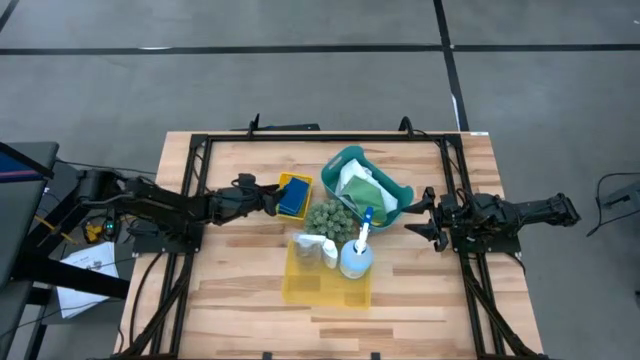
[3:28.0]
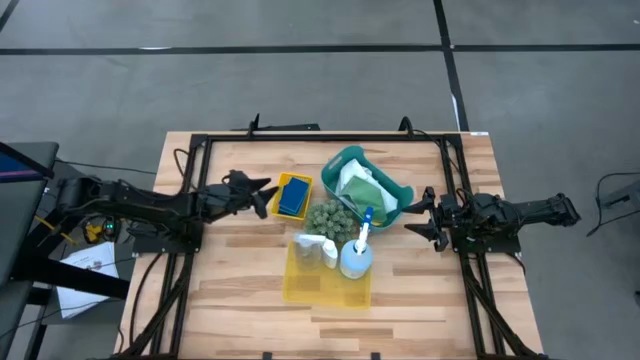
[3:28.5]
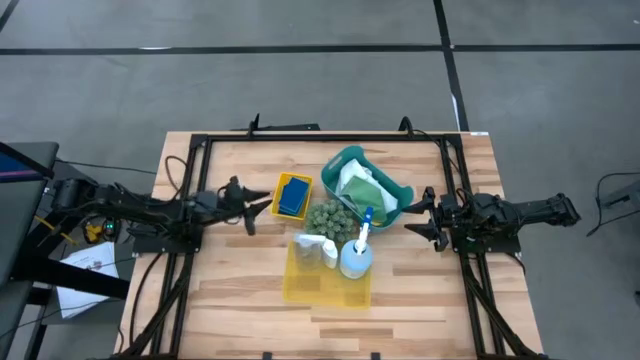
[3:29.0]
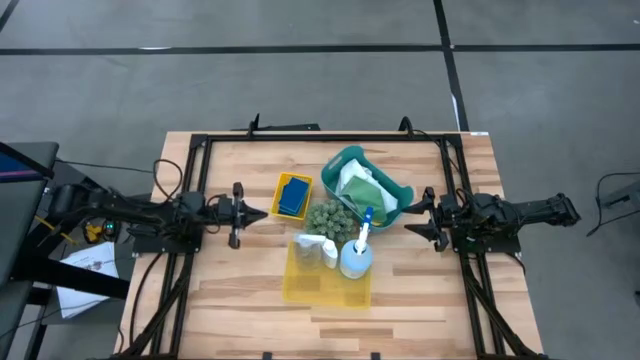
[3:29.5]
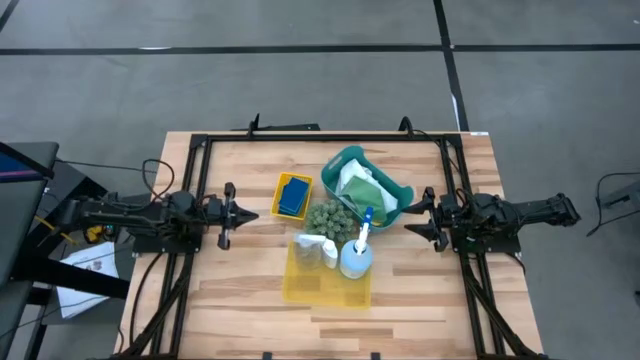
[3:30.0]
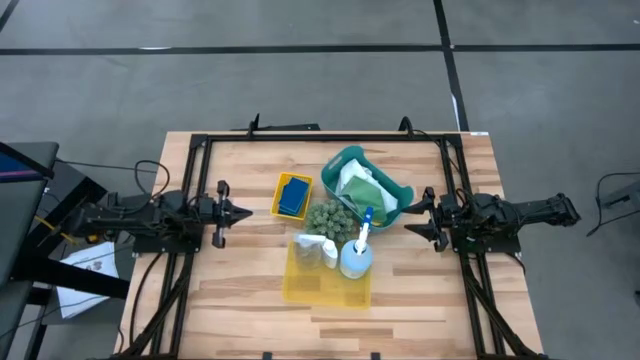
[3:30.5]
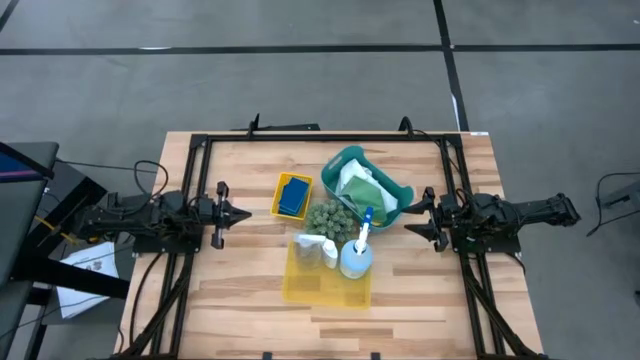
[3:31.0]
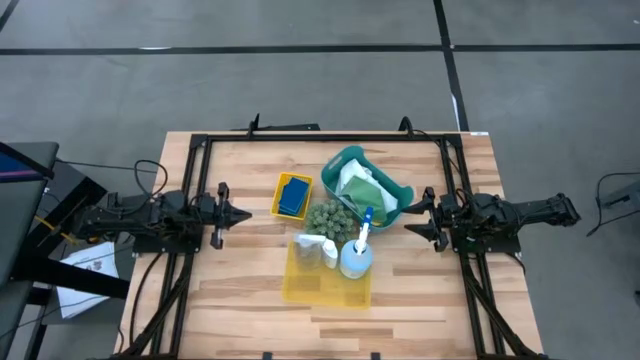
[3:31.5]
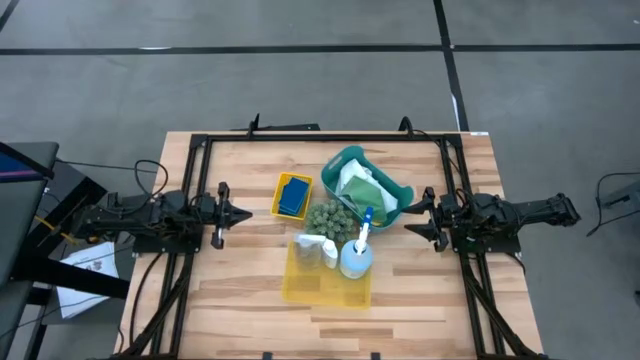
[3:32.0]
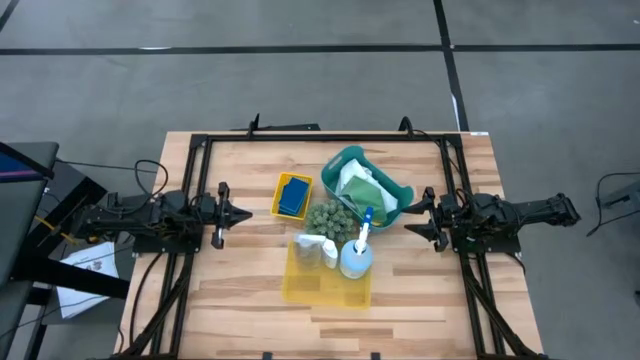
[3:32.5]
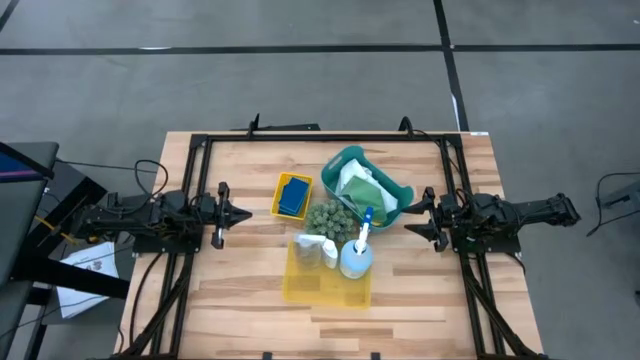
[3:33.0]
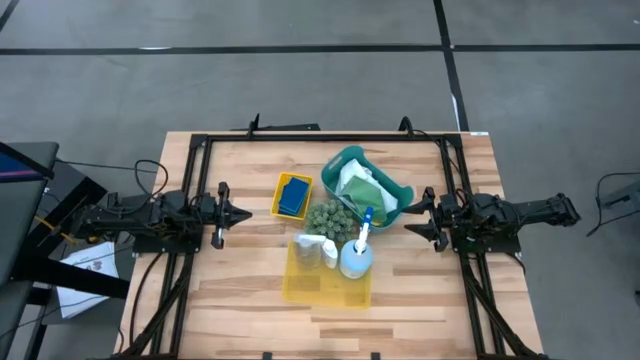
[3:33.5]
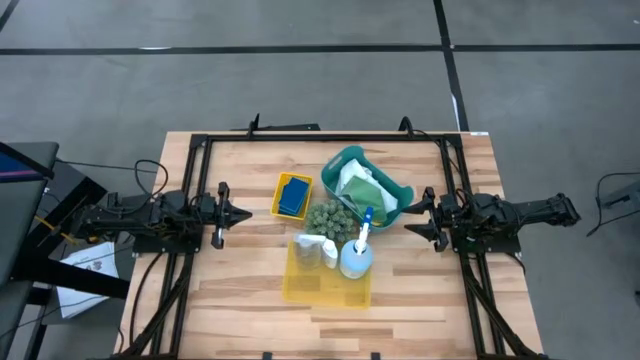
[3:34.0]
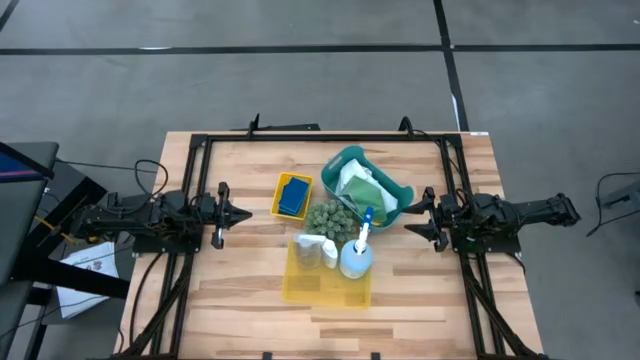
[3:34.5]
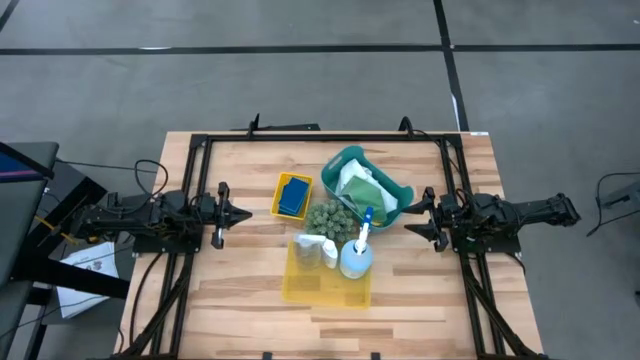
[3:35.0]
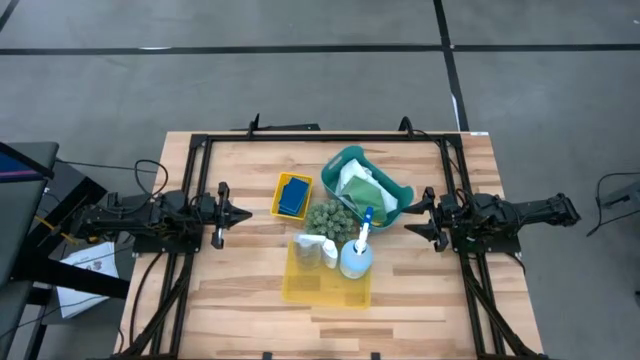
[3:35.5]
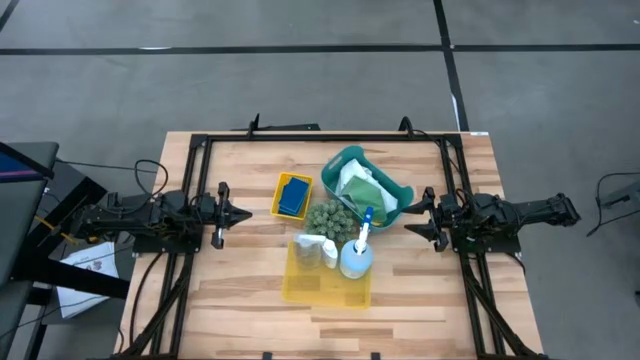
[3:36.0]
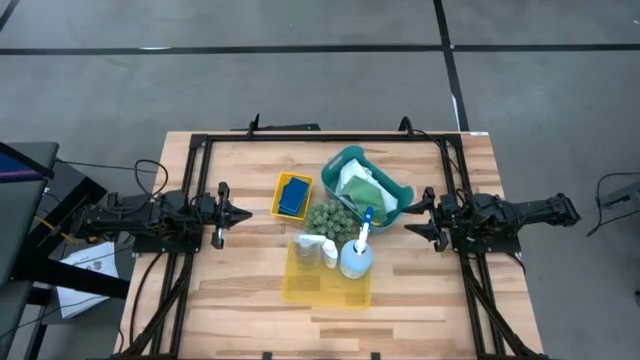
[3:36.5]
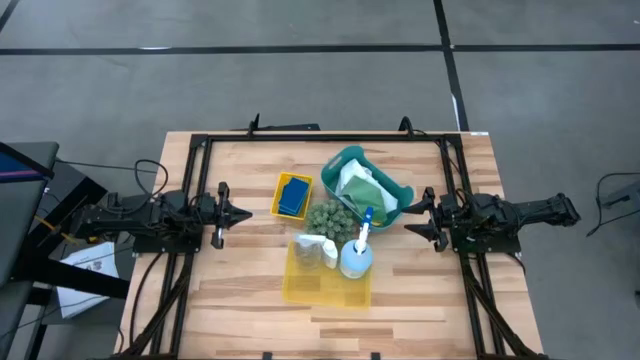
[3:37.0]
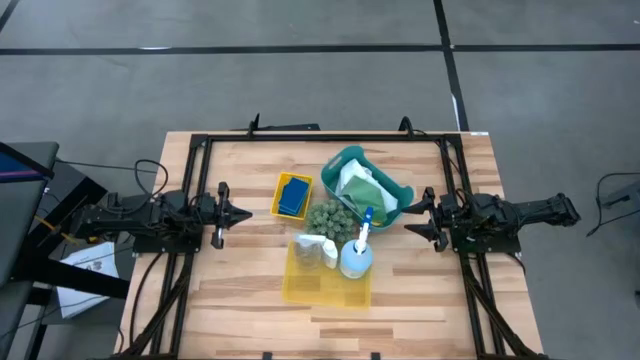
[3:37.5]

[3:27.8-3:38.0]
Task: Pick & Place Kitchen Items
Return to Home Position

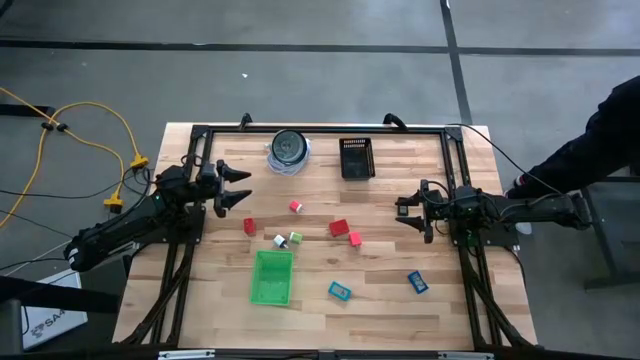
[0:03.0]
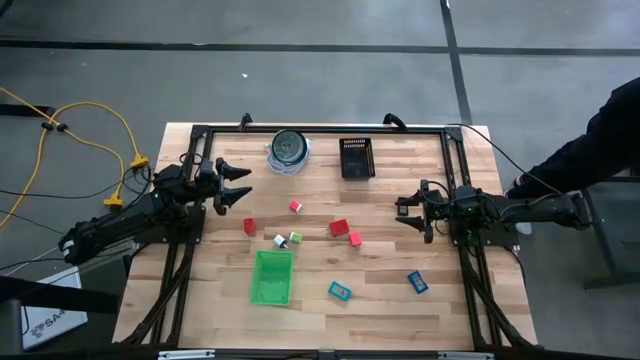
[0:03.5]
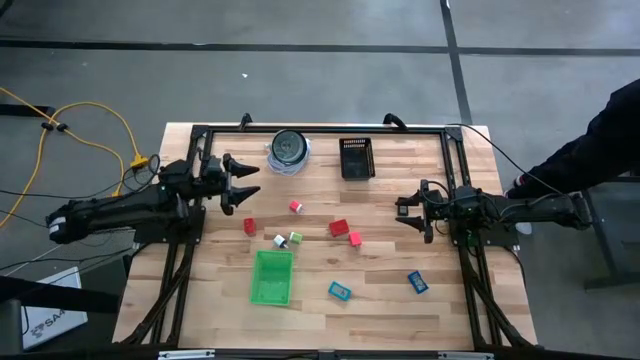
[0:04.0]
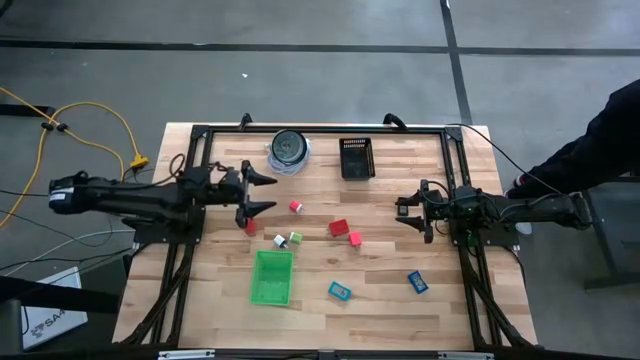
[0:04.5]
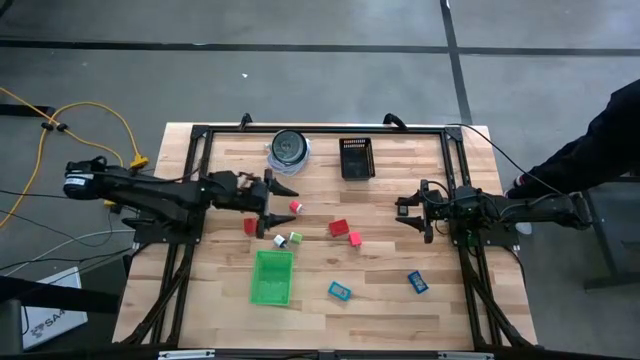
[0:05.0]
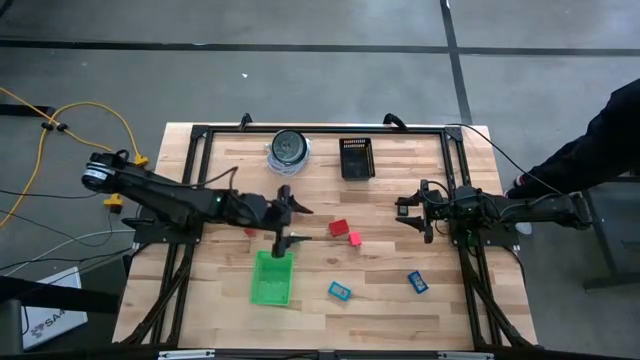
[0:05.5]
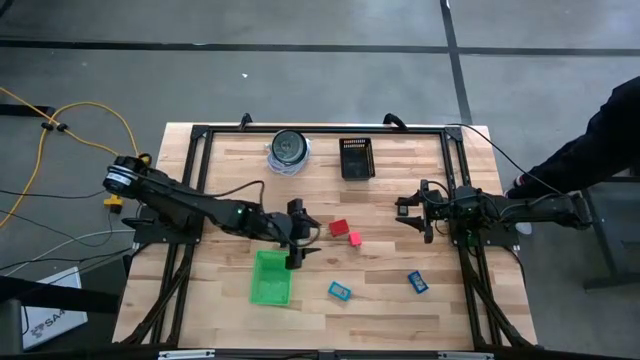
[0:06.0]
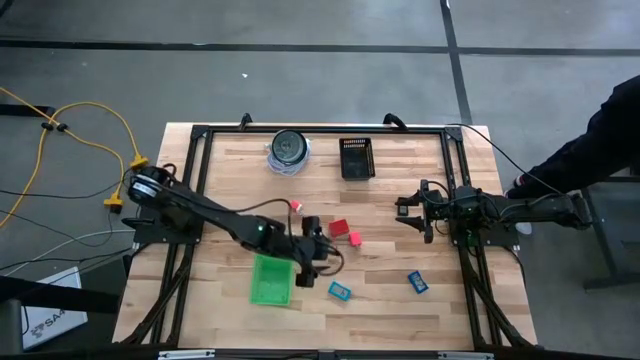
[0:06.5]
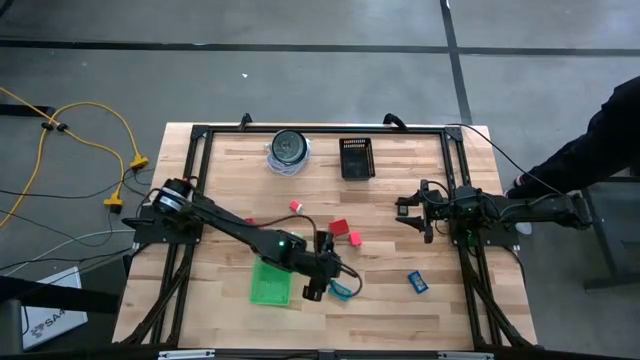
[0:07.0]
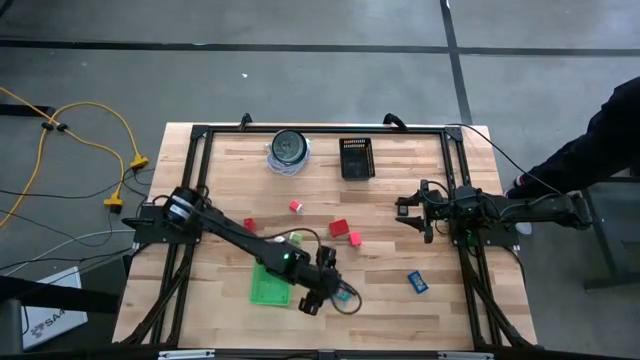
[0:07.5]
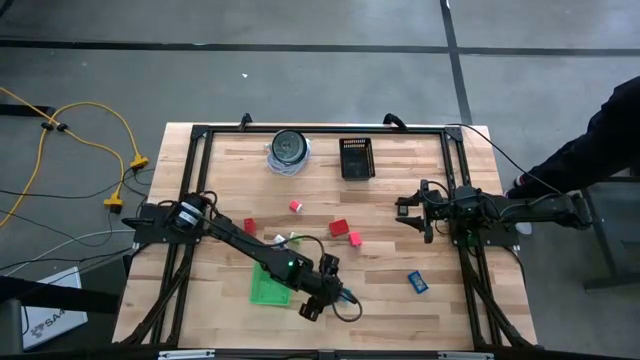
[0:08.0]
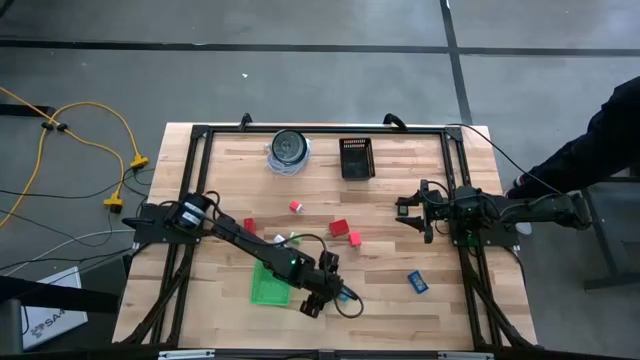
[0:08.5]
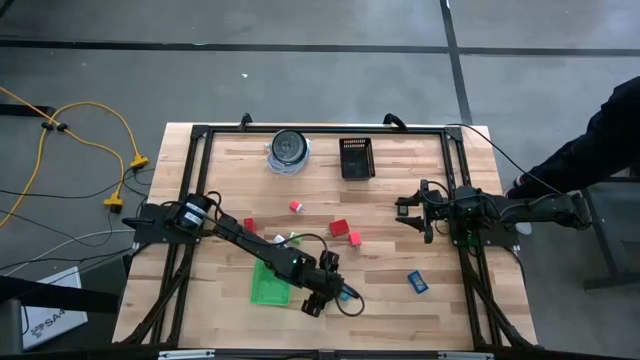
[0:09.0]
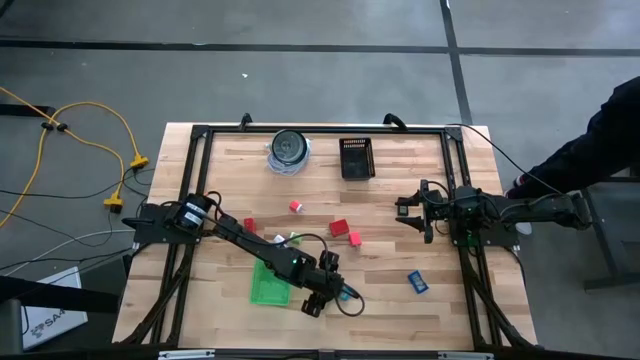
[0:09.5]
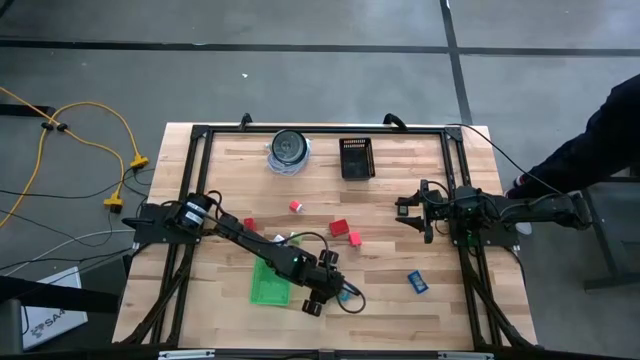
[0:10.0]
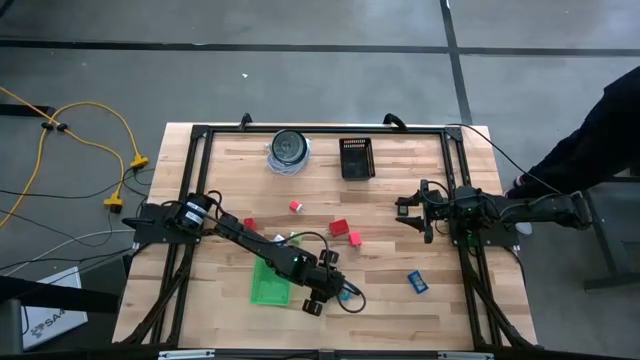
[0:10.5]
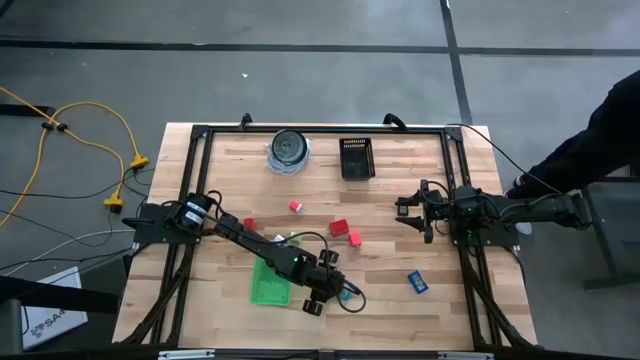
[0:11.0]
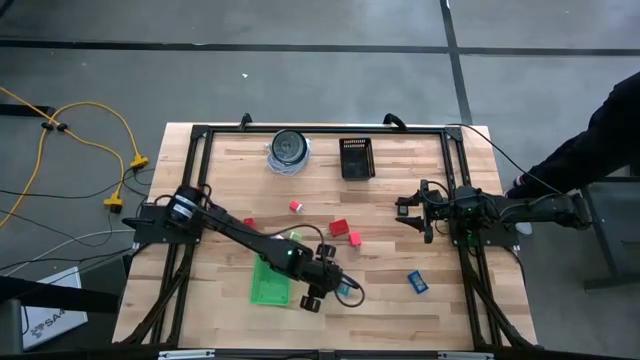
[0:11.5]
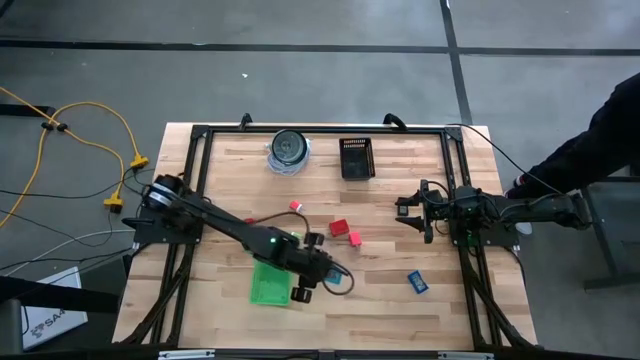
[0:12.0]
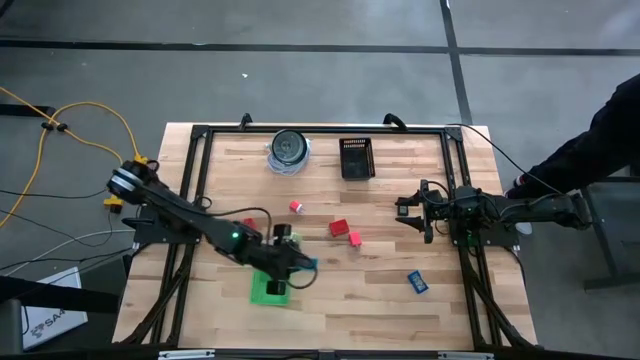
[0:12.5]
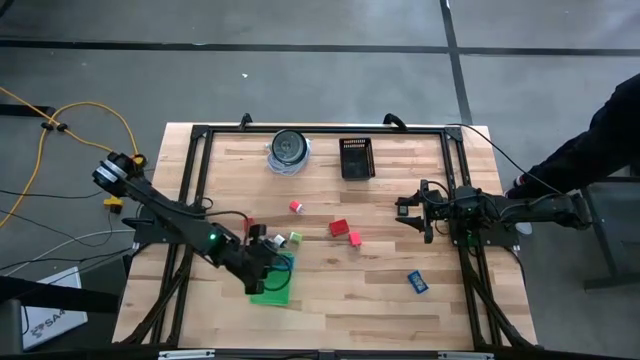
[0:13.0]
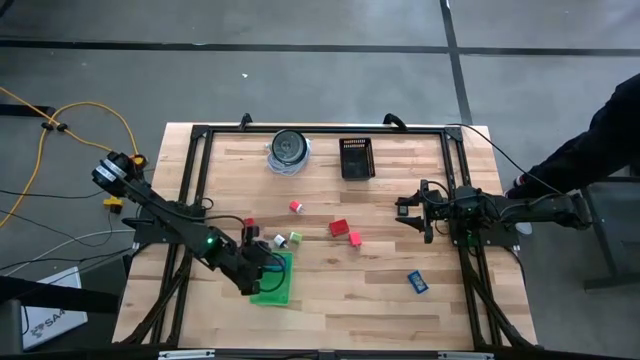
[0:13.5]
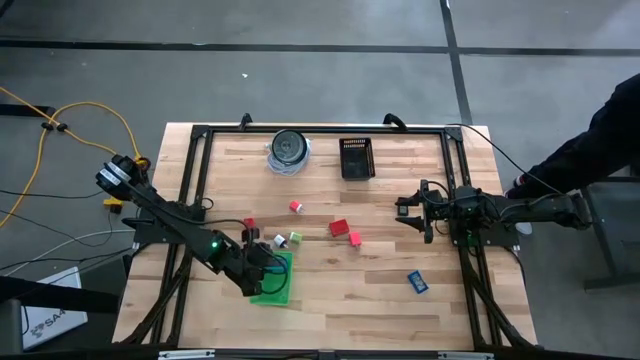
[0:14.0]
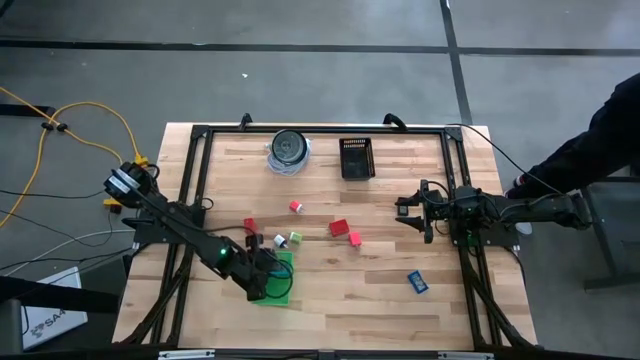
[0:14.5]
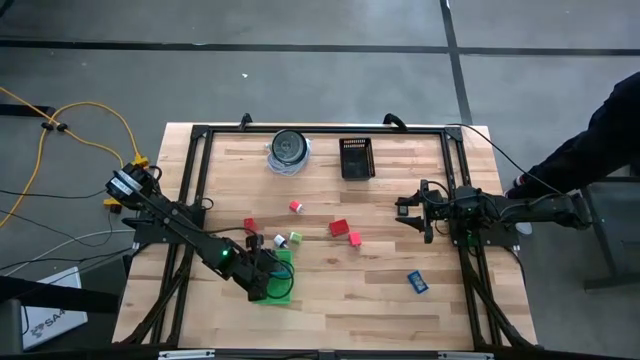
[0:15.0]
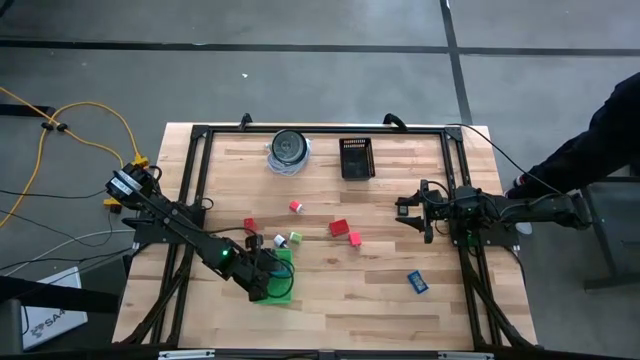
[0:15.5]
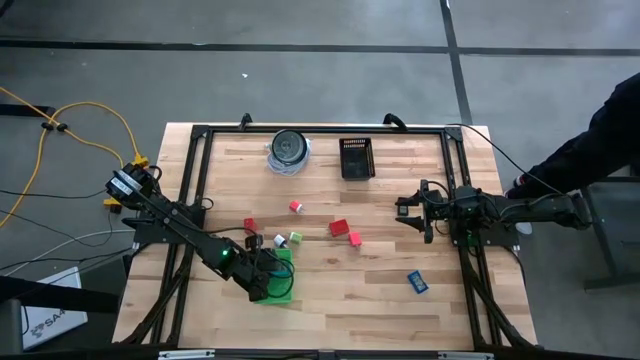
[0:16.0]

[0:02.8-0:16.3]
Task: Pick & Place Office items
Put the blue digital clock into the green bin
